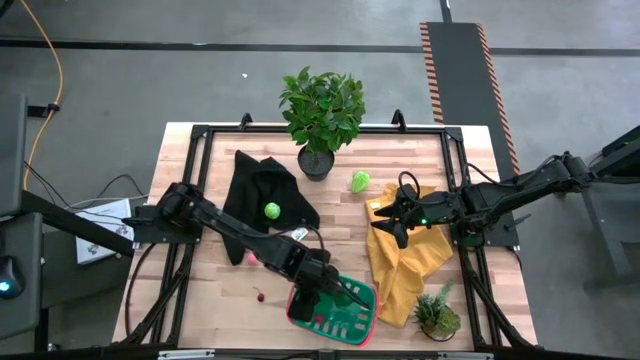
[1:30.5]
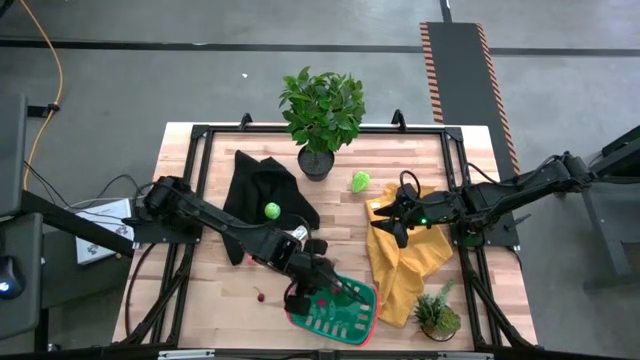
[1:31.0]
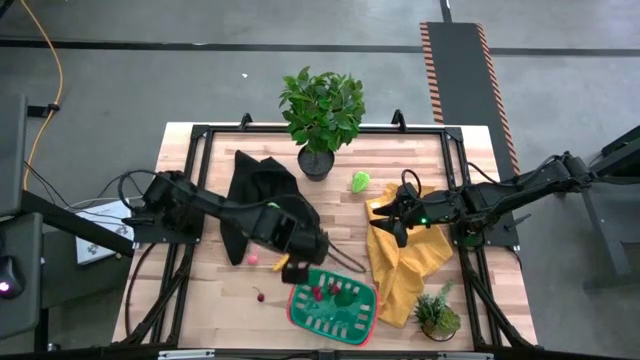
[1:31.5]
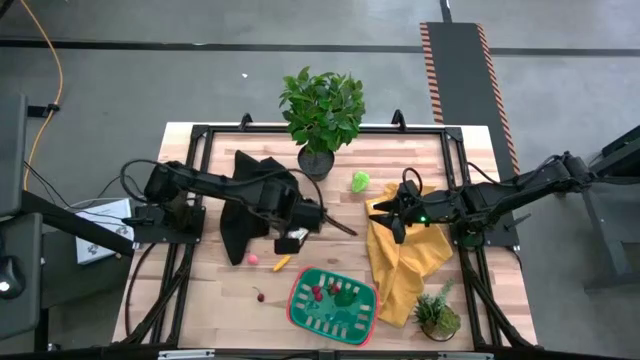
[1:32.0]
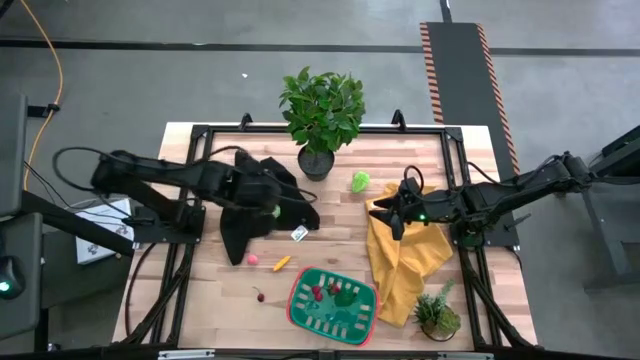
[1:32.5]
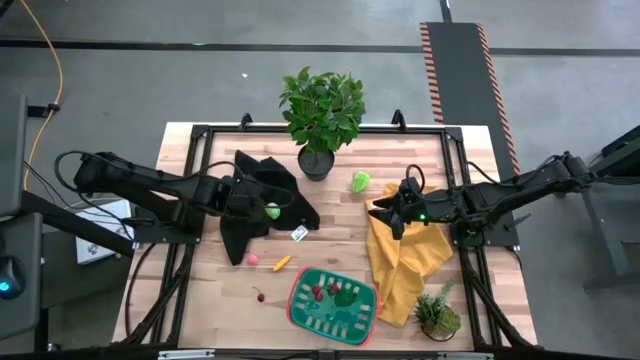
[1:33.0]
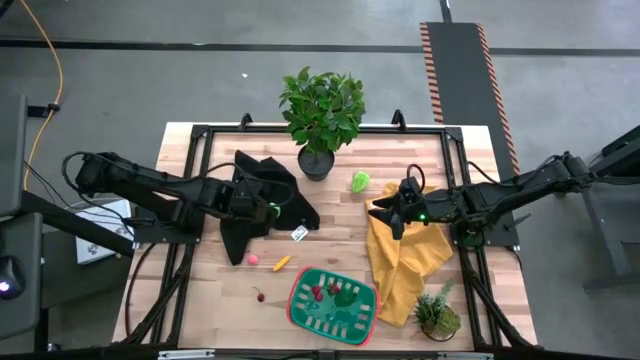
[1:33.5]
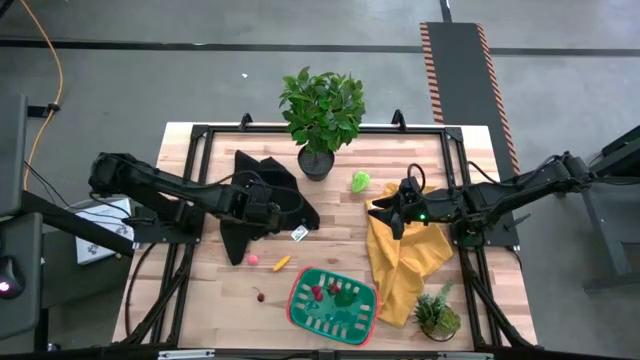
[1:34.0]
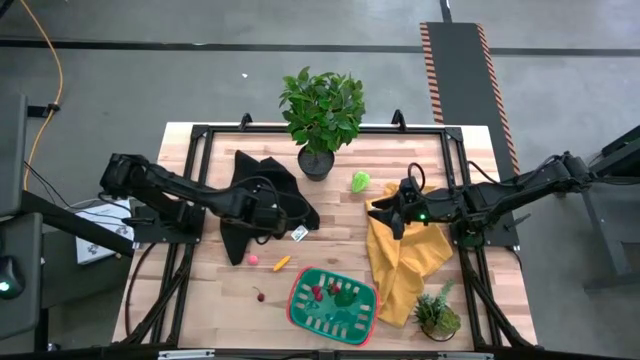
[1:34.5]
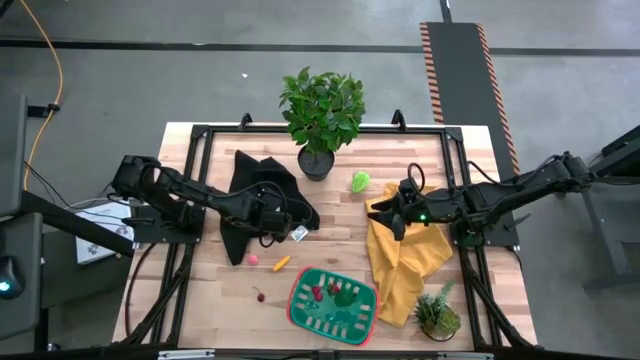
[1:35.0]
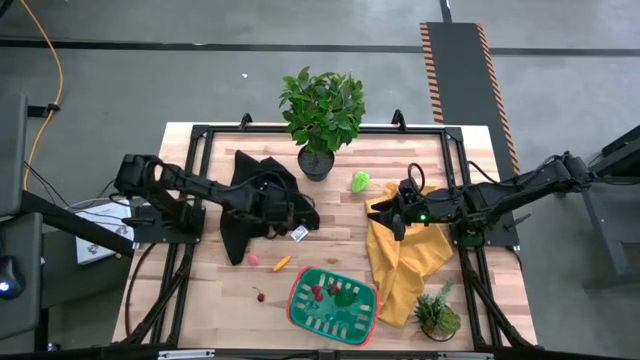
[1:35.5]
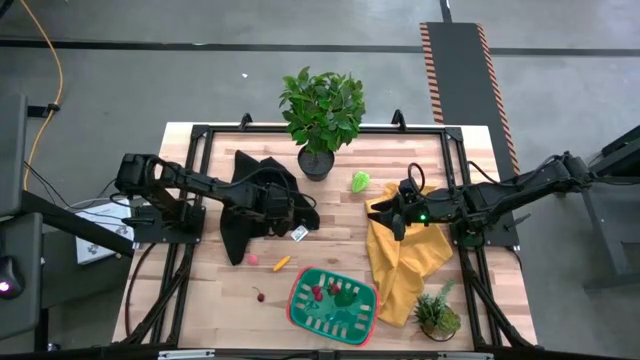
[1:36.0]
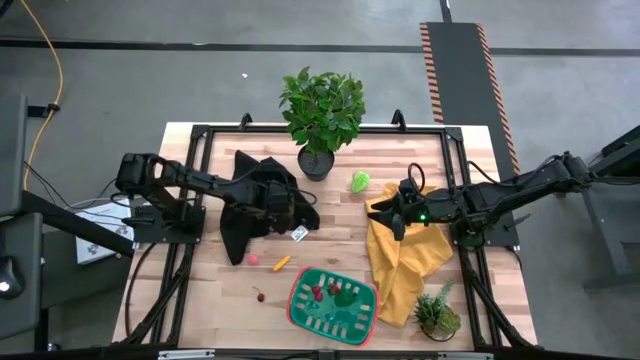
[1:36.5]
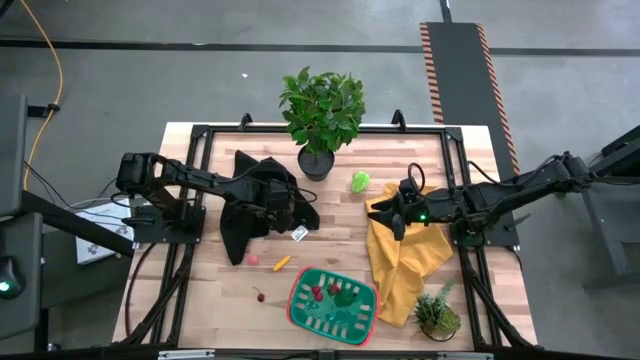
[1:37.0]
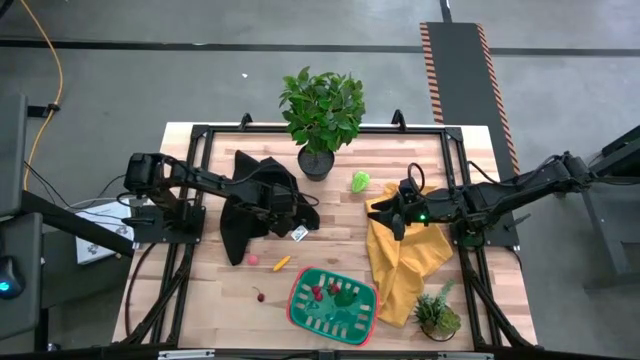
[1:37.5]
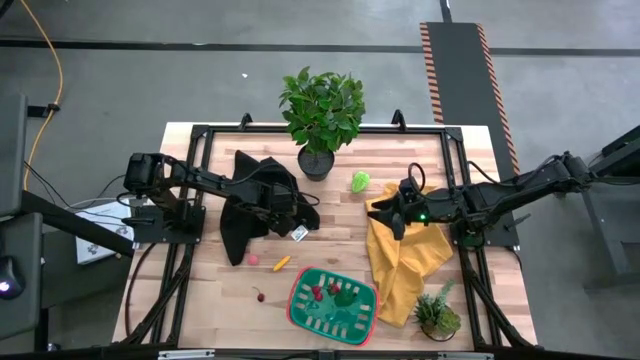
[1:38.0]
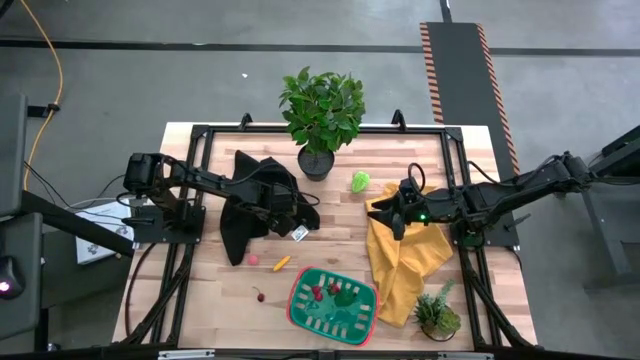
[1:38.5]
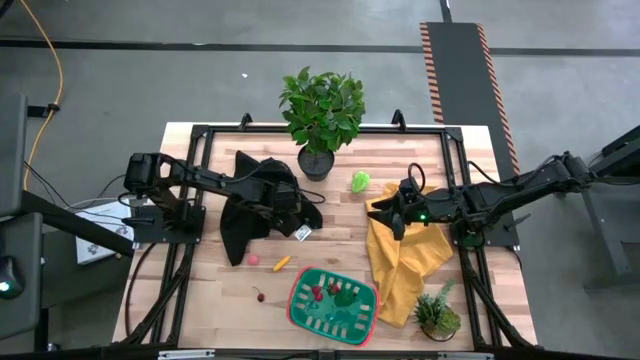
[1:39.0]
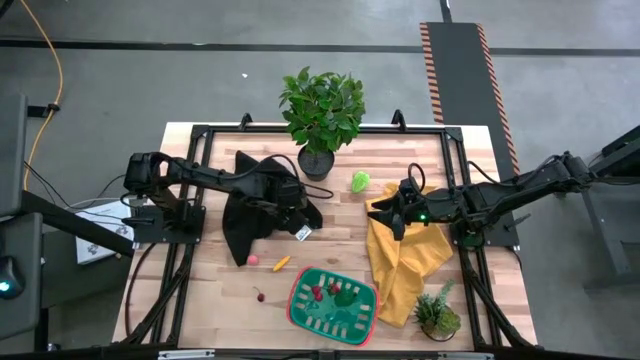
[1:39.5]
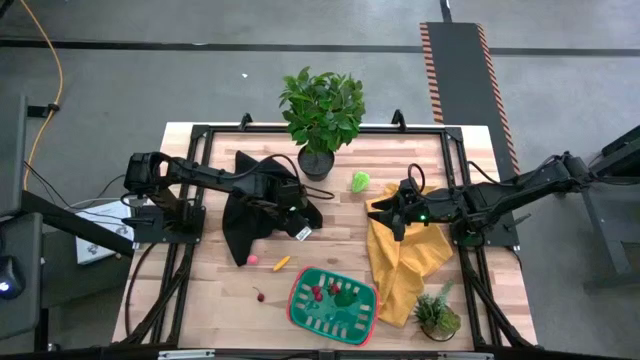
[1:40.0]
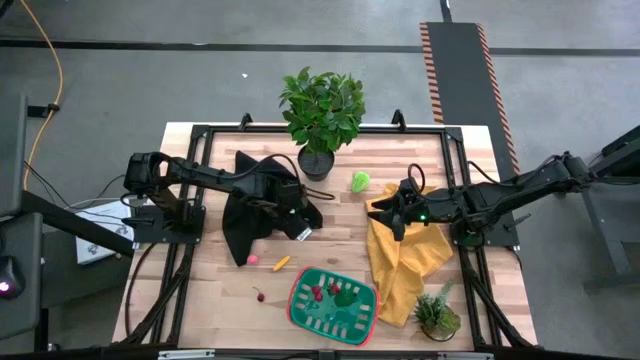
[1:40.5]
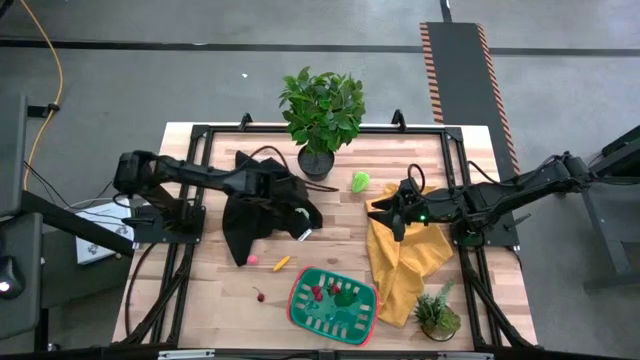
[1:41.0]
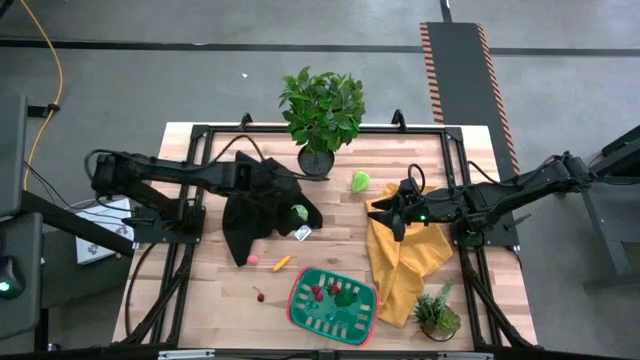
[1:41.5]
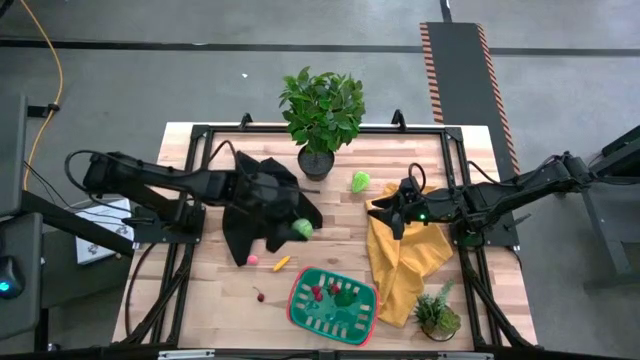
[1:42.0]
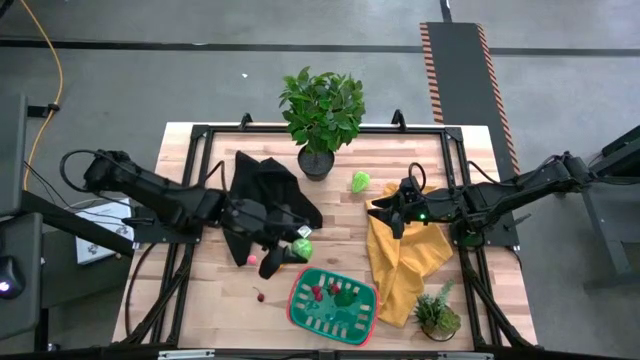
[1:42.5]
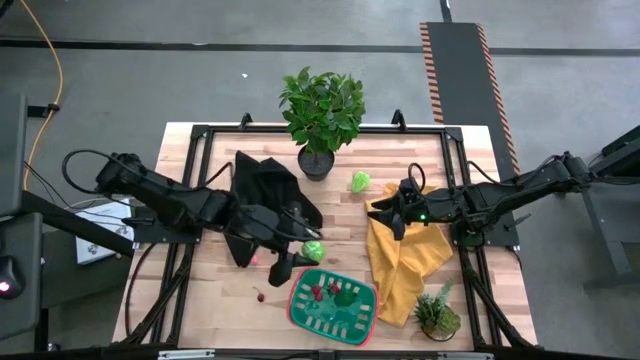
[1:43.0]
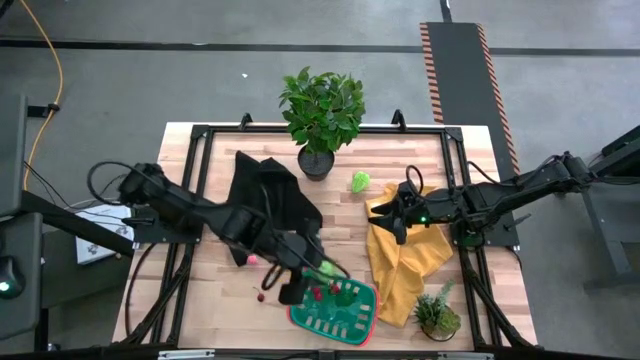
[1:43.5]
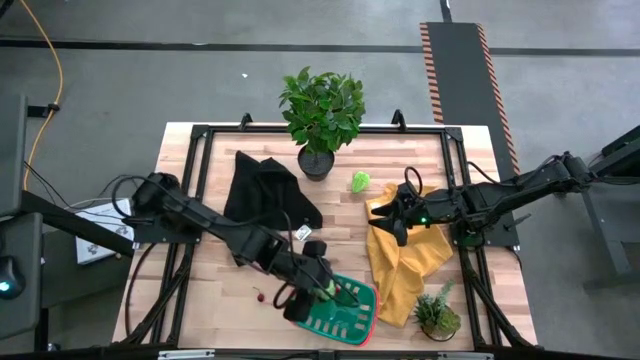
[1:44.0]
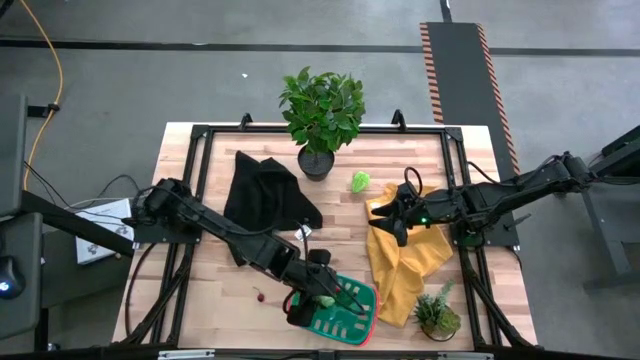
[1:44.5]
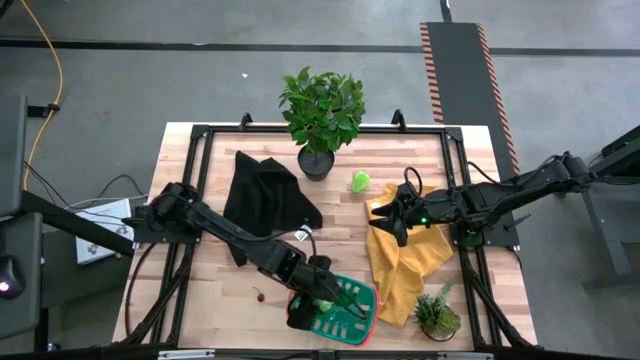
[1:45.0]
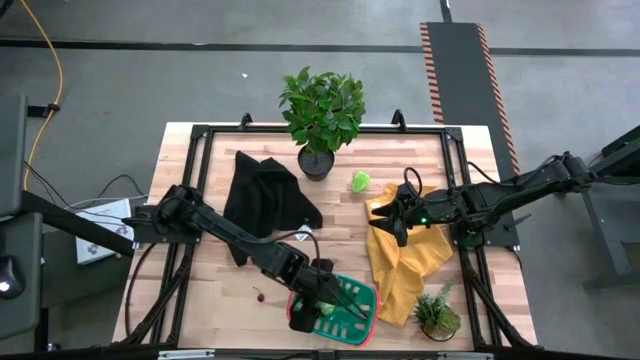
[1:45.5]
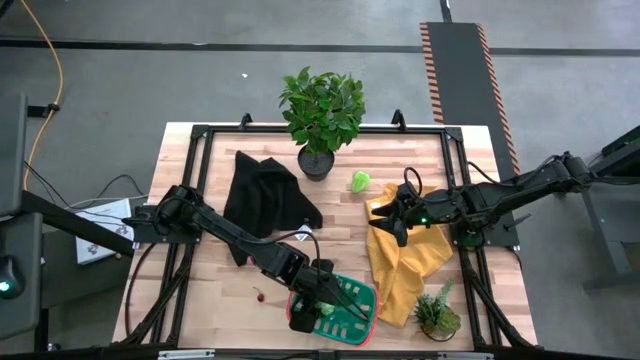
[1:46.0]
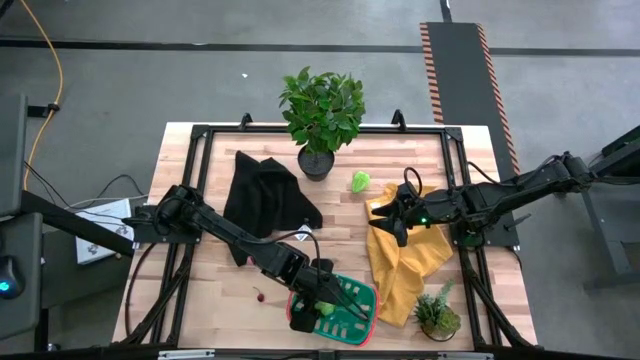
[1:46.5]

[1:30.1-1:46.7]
Task: Pick and placing Produce into tupperware
Put the green cabbage into the blue bin

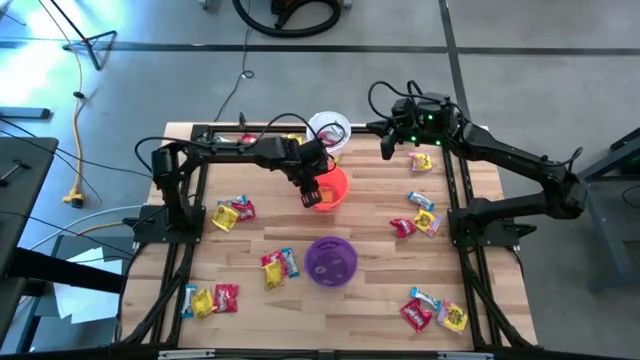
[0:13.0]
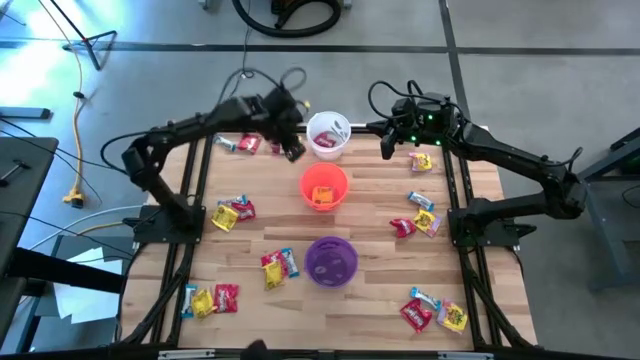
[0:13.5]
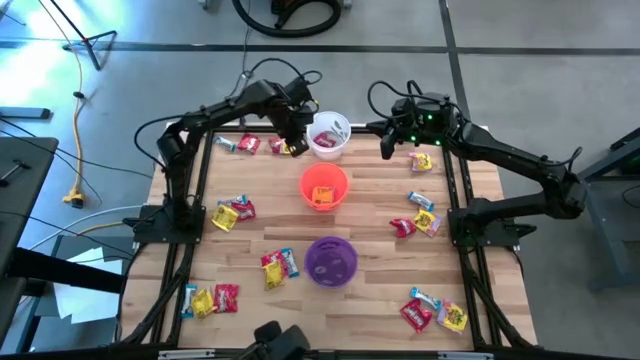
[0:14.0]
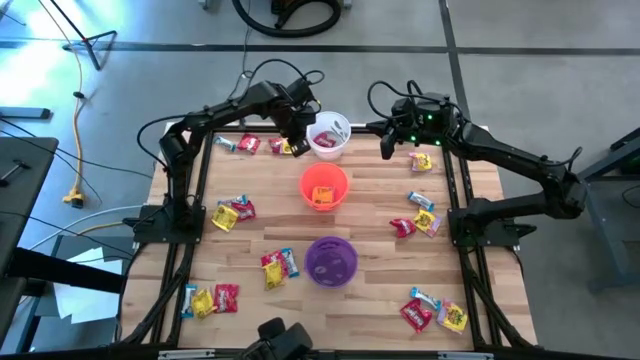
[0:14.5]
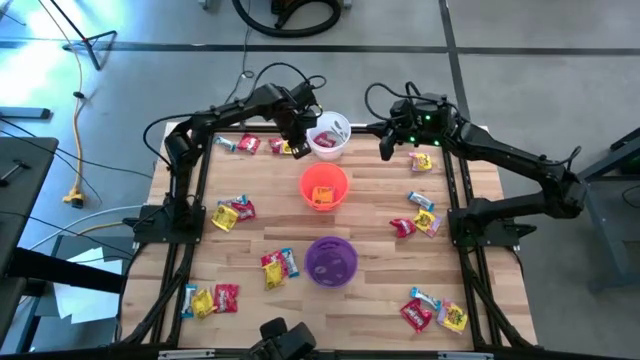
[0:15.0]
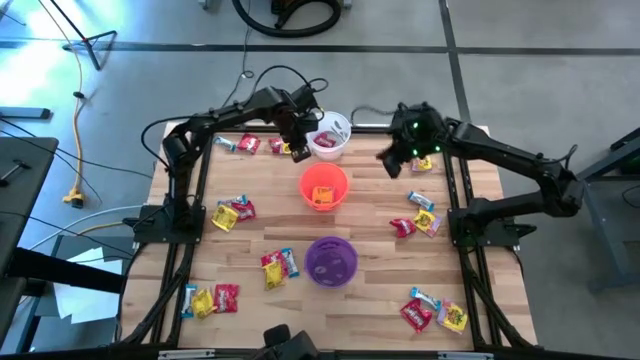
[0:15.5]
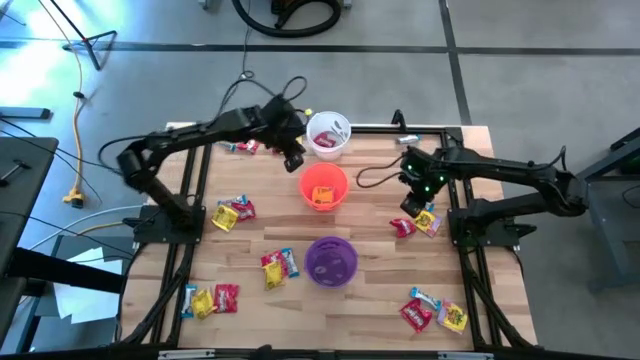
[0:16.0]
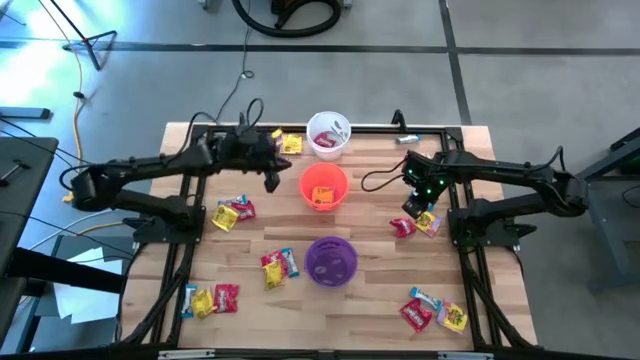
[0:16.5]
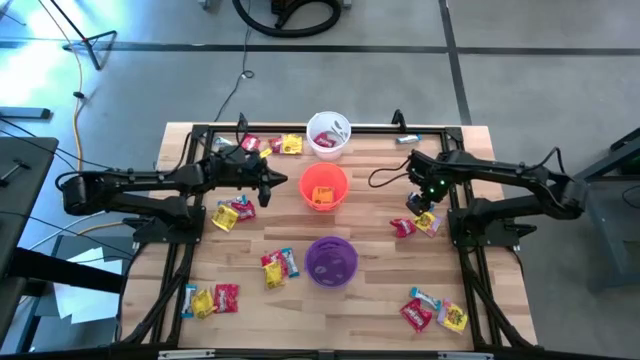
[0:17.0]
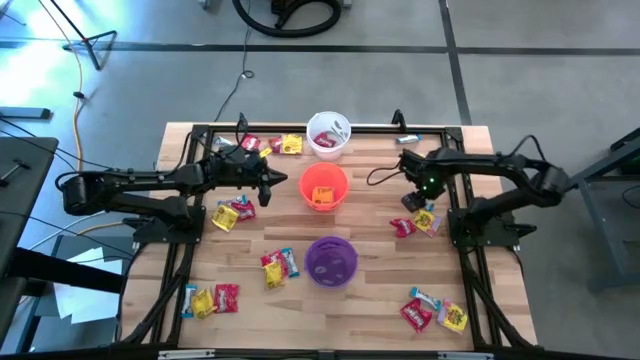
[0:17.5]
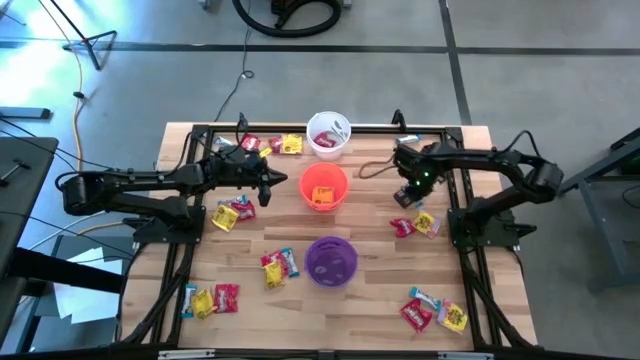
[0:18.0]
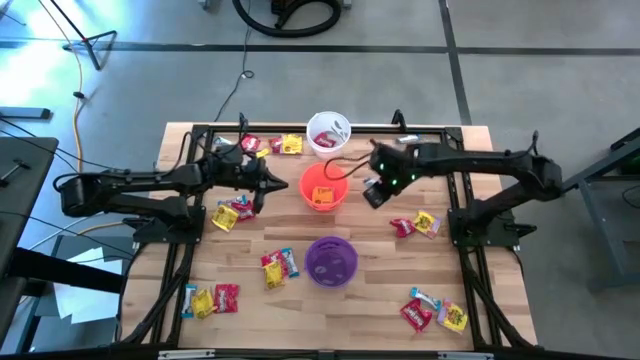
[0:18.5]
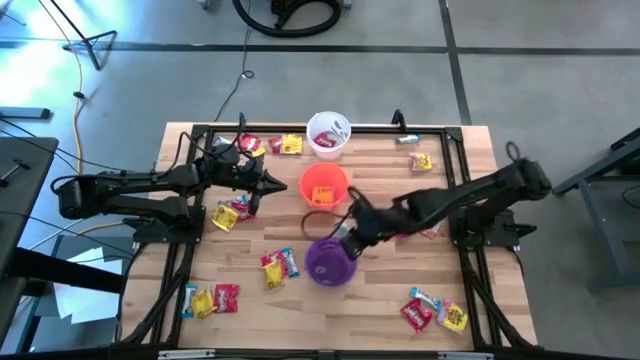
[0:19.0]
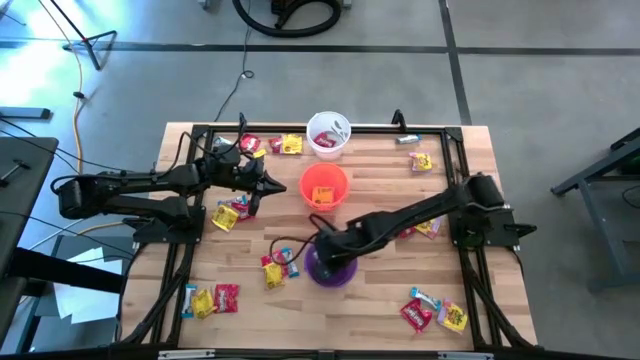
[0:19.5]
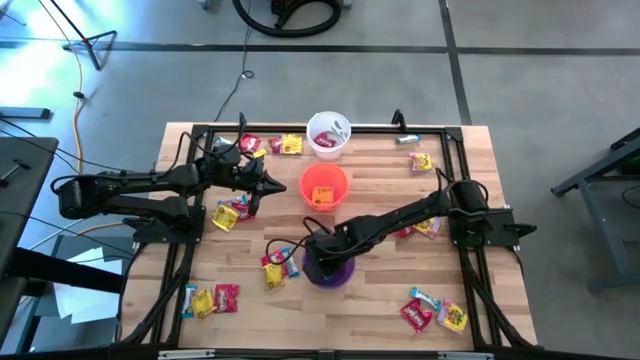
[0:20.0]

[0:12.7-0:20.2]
Task: Sort candy
Put the white chocolate into the violet bucket
